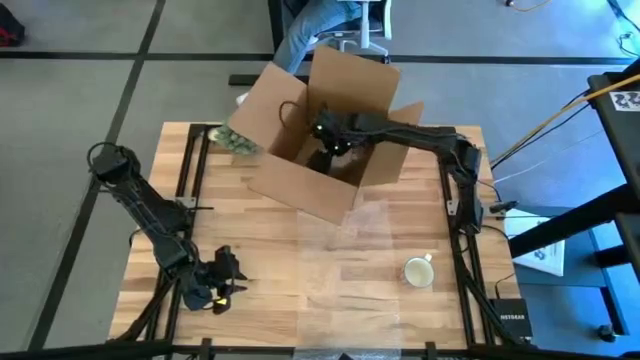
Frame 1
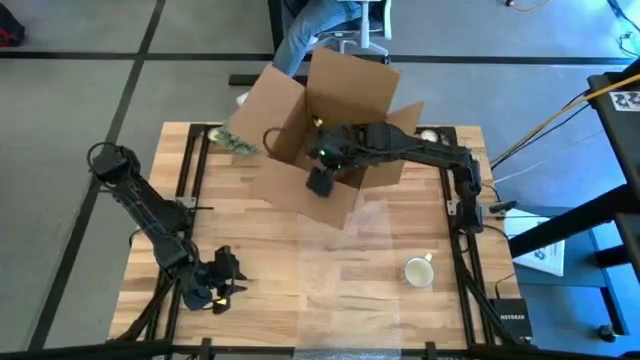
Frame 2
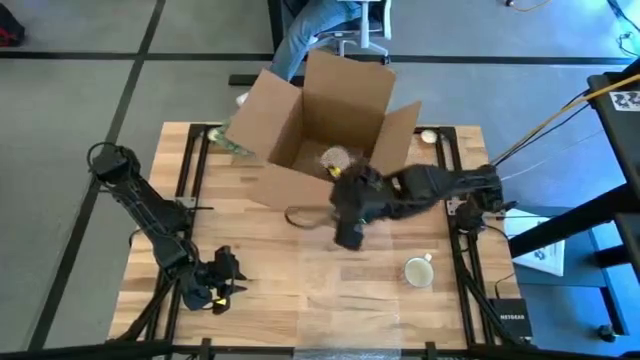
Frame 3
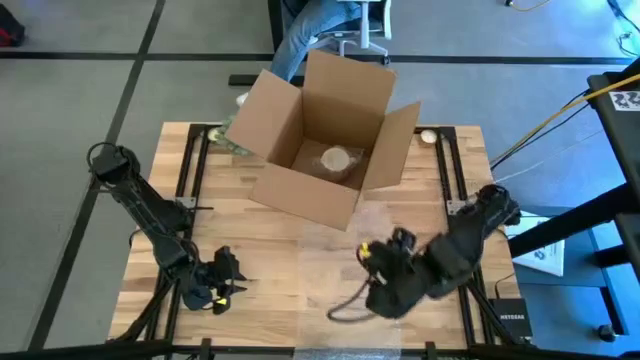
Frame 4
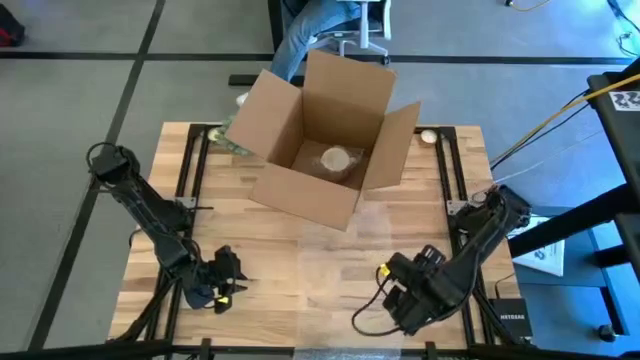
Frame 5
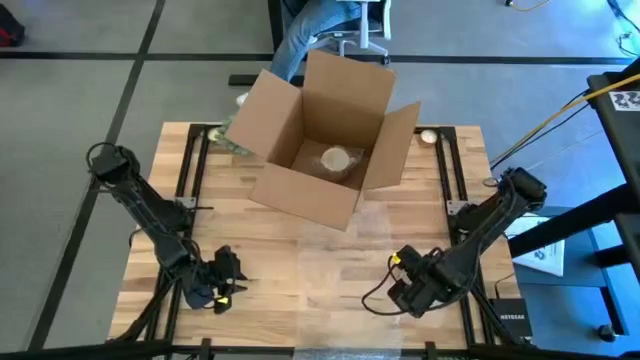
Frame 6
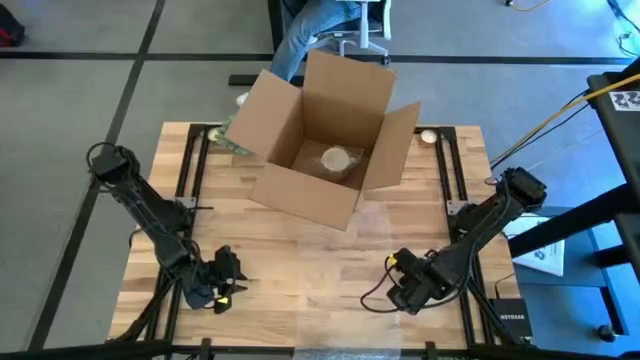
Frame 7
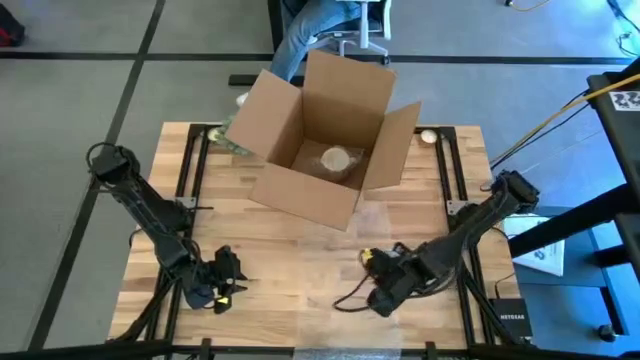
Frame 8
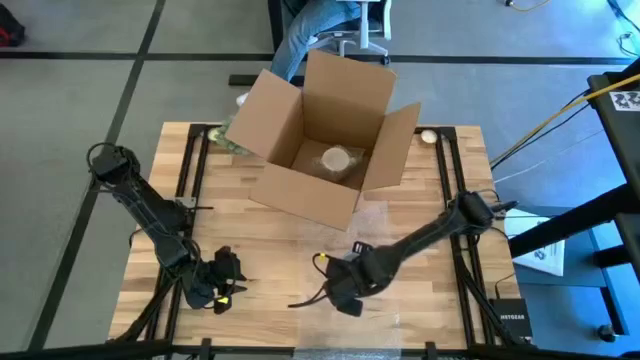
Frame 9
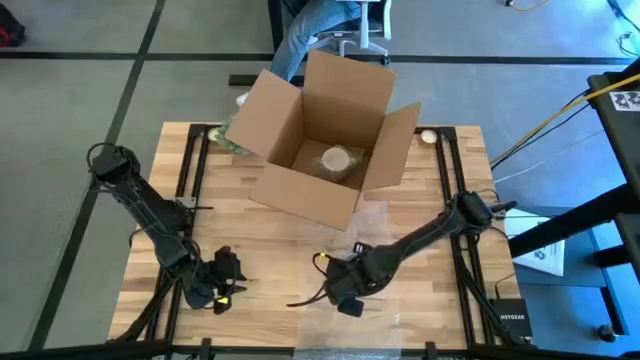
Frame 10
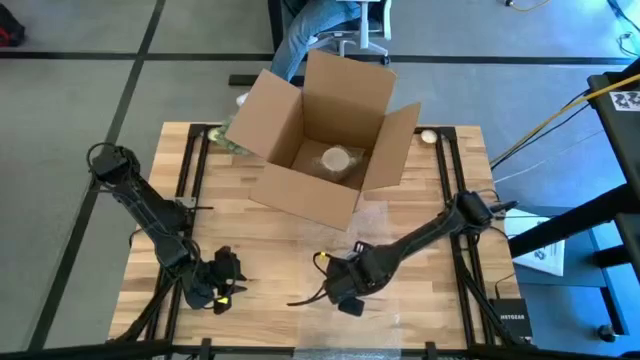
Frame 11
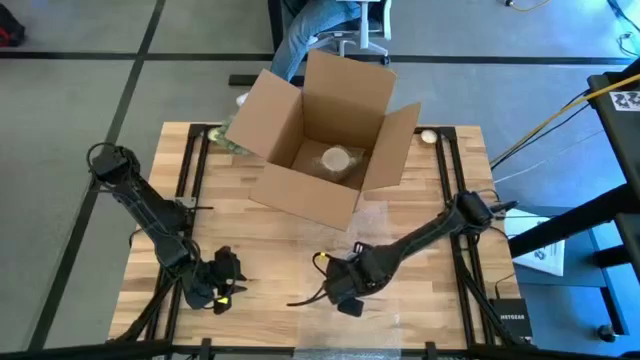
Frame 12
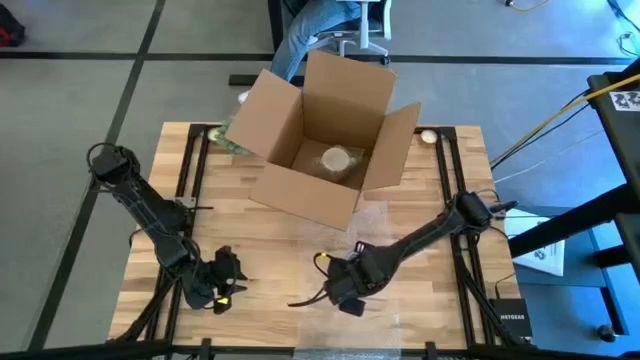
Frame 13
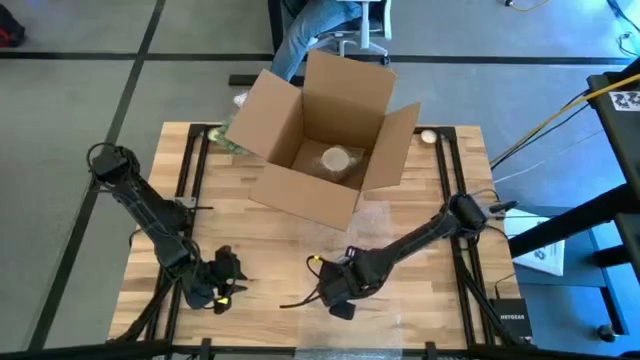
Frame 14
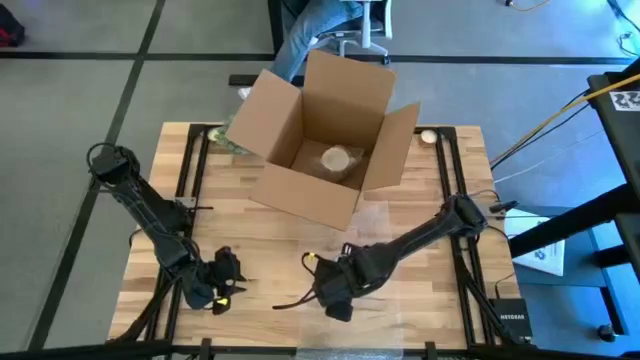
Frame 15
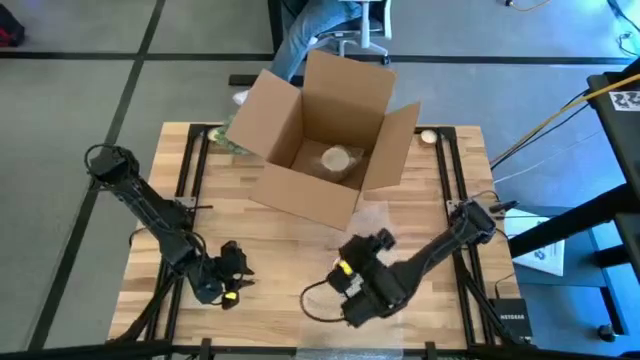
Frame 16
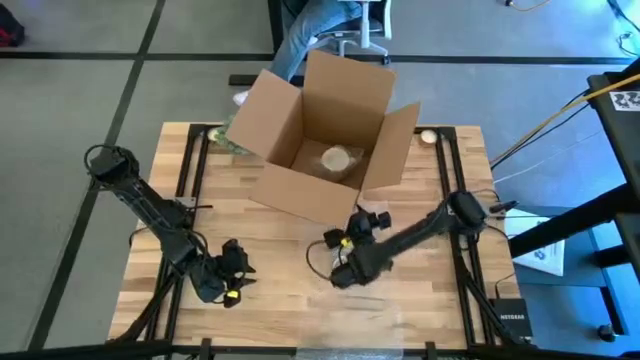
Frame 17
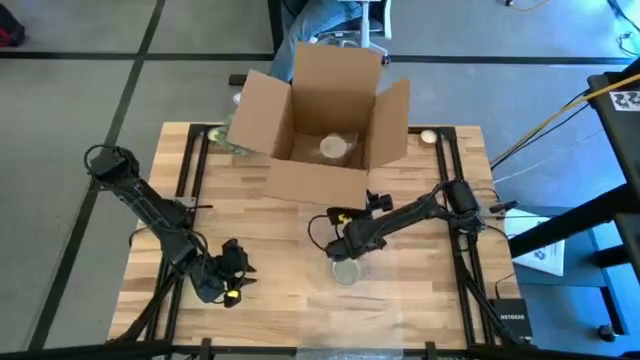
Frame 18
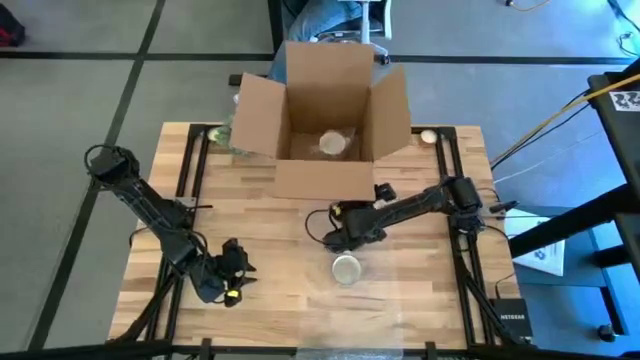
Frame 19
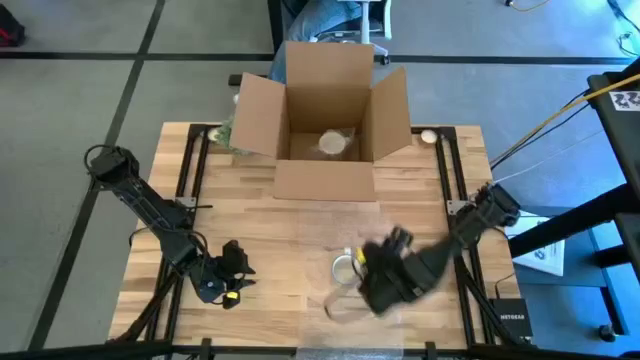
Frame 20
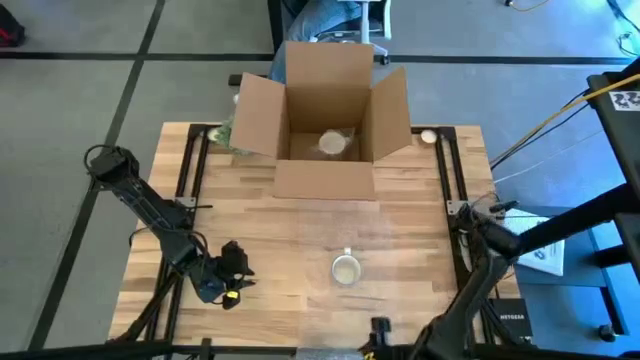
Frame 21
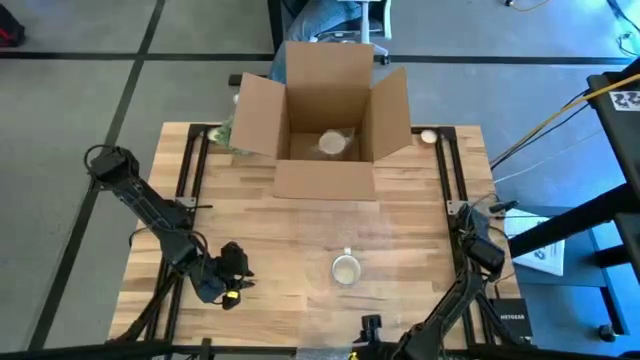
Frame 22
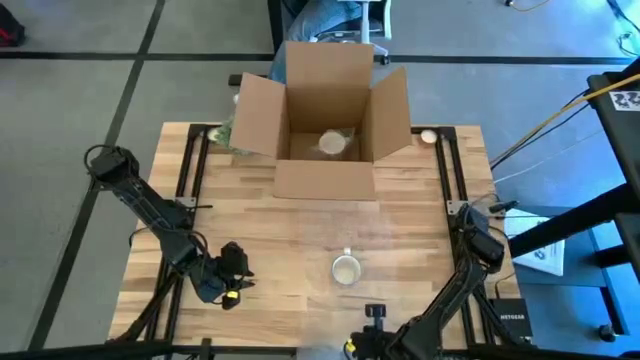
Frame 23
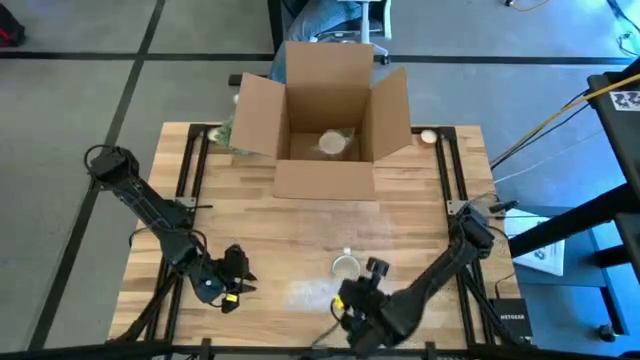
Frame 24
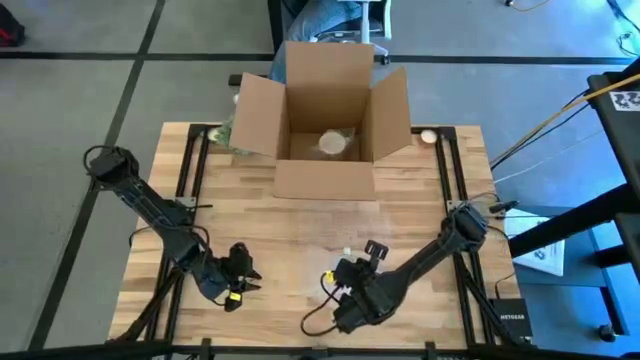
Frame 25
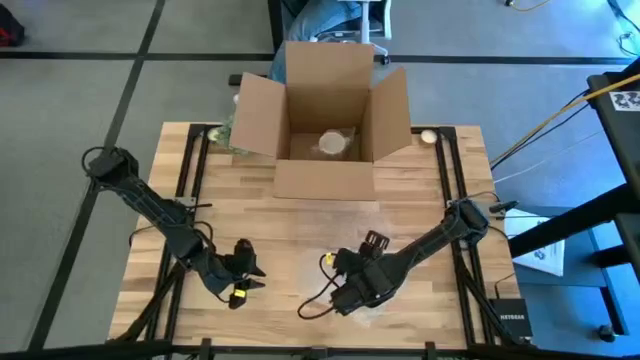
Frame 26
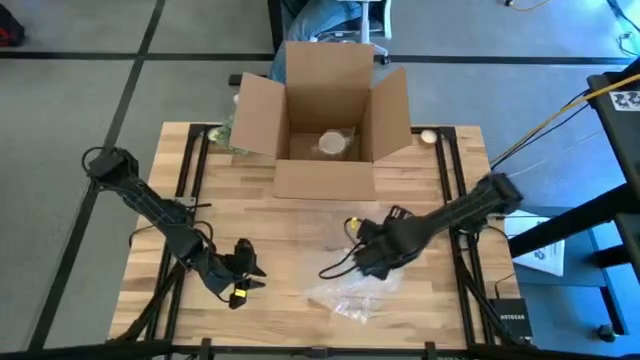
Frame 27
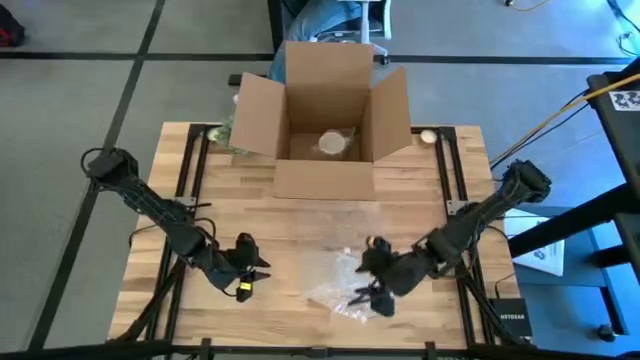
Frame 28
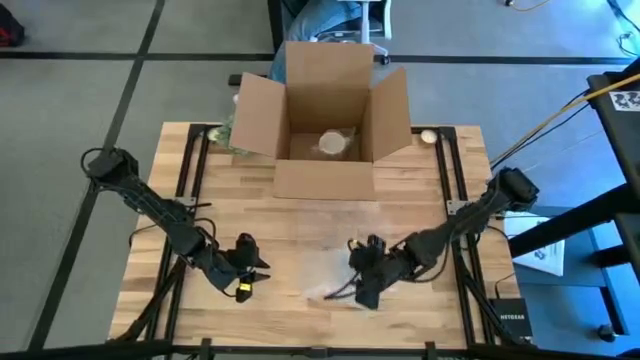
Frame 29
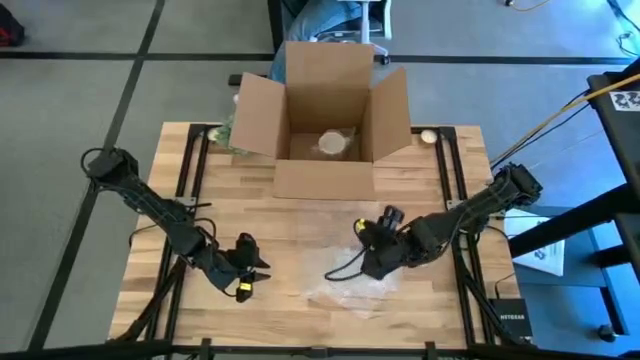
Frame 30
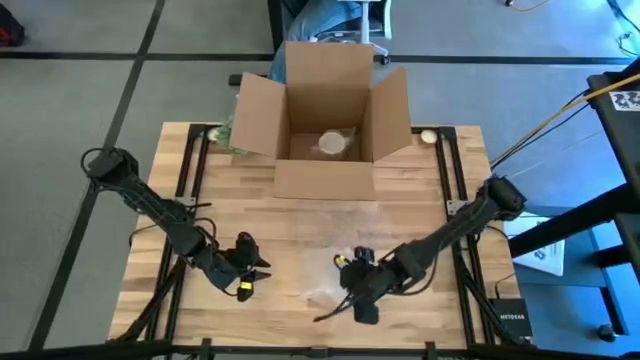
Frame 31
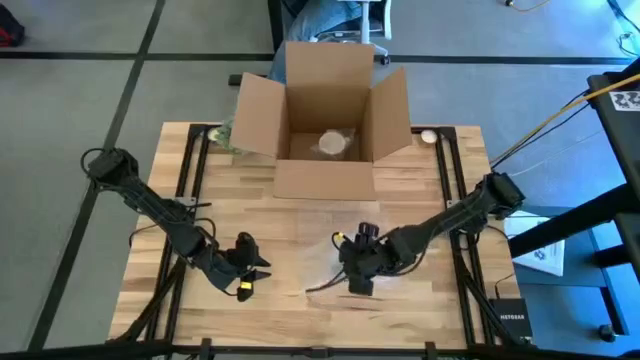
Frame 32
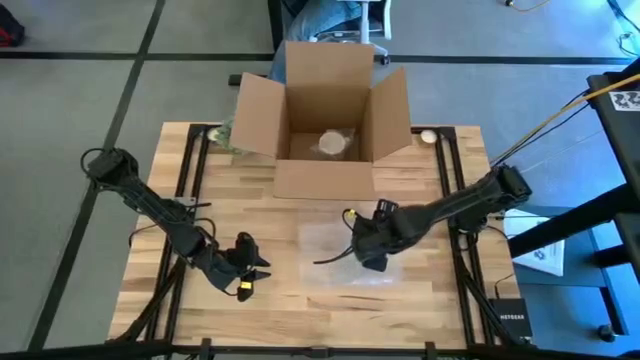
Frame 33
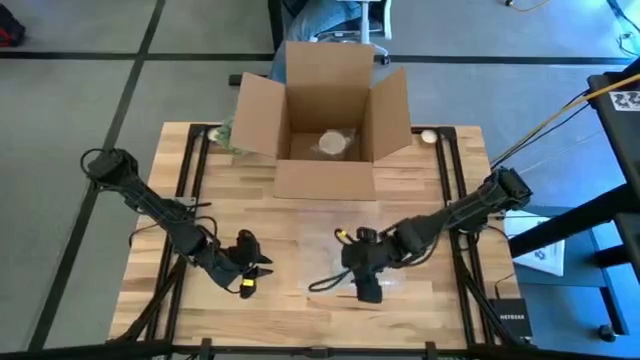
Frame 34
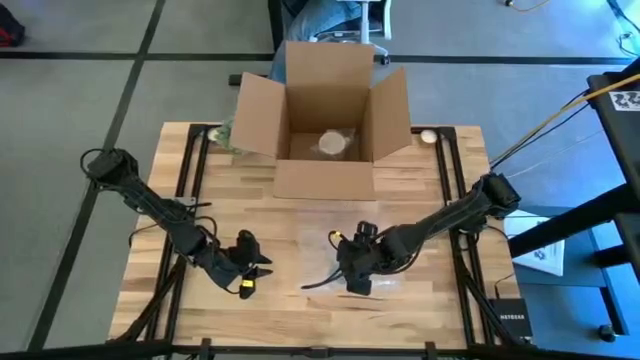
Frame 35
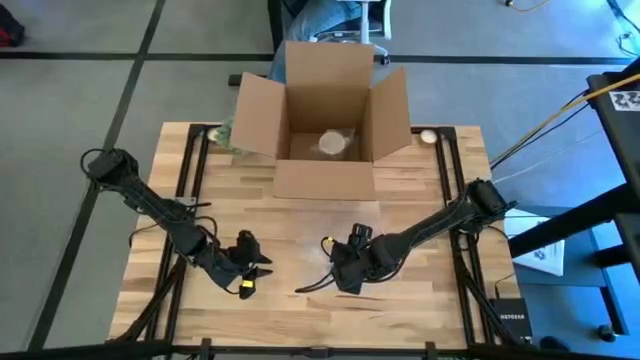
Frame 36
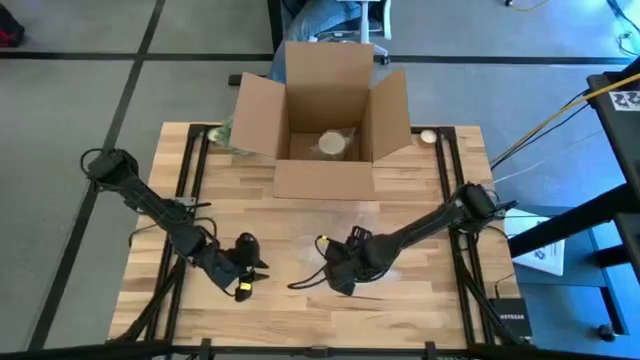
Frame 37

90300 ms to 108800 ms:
Task: wrap mug
Wrap the red mug with bubble wrap

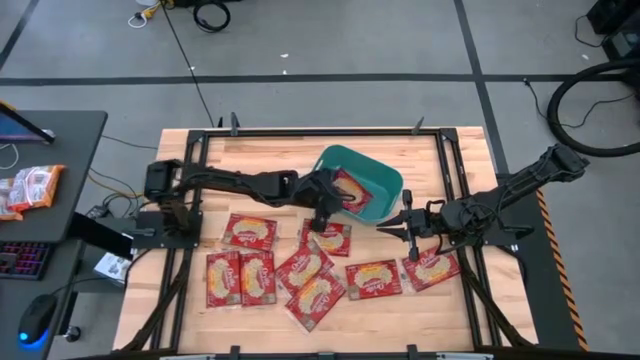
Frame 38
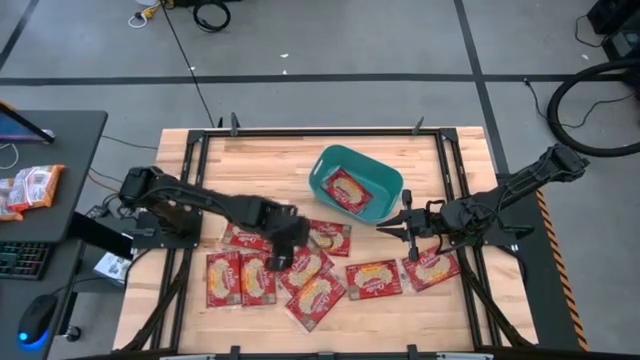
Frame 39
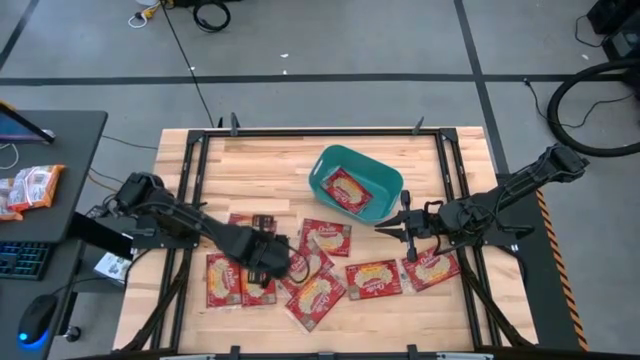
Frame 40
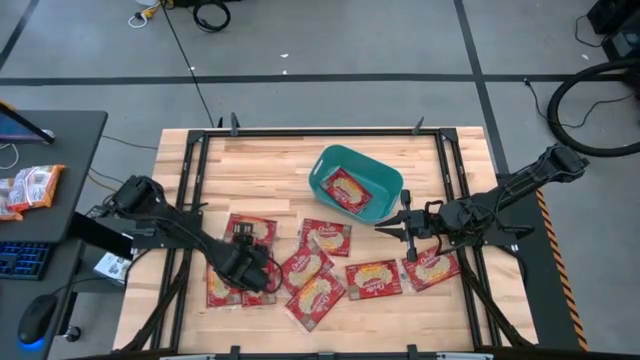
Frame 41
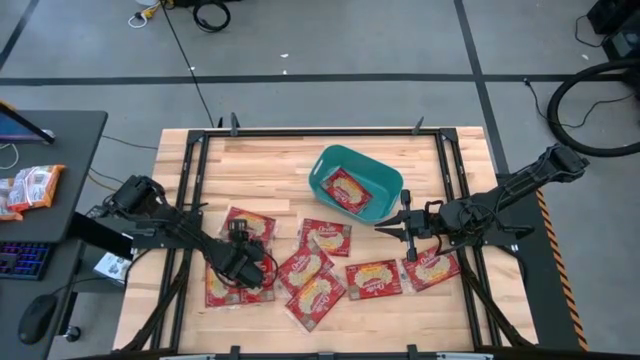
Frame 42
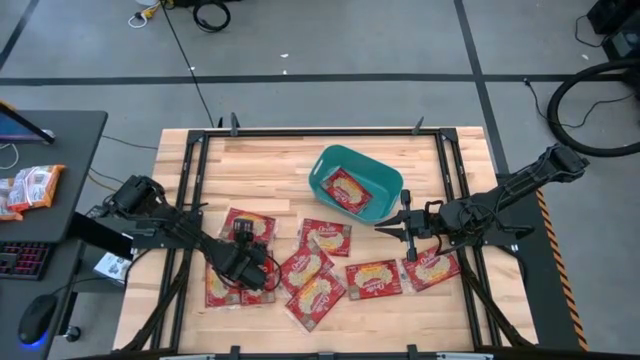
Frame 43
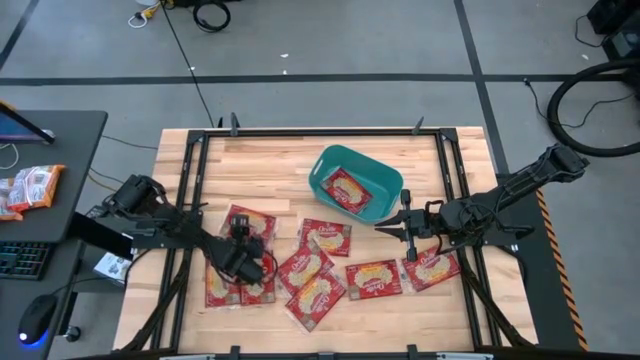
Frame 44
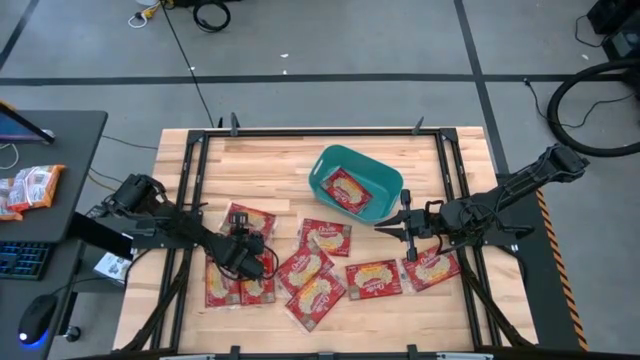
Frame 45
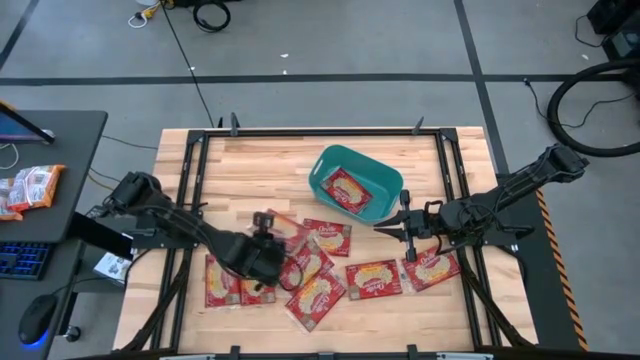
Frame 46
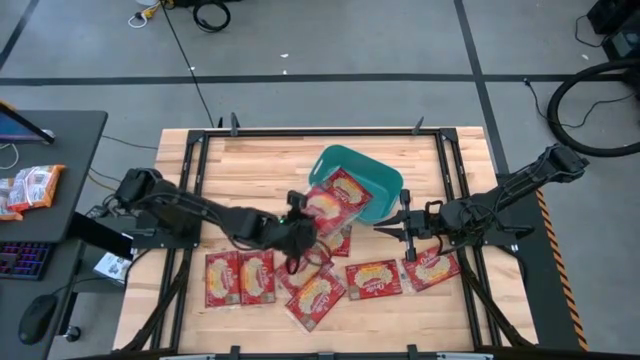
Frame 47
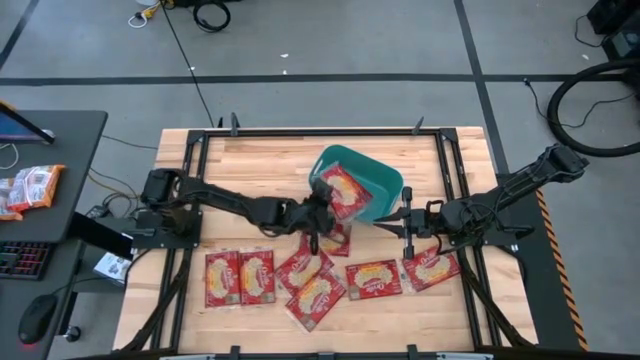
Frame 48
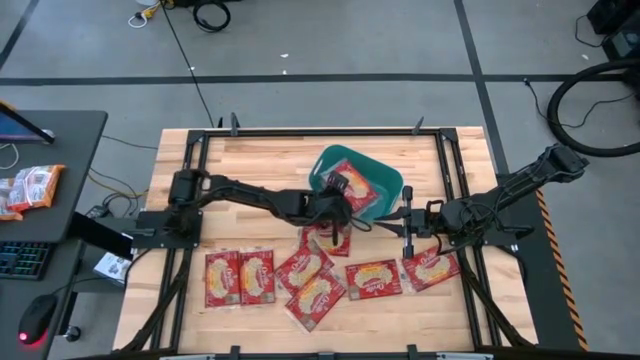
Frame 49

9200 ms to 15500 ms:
Task: Sort popcorn bags into baskets
Put the red popcorn bag into the green bin
